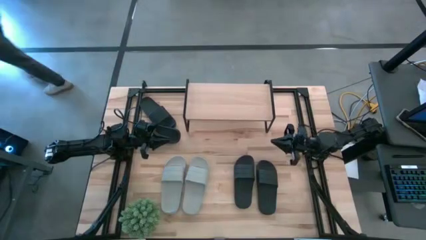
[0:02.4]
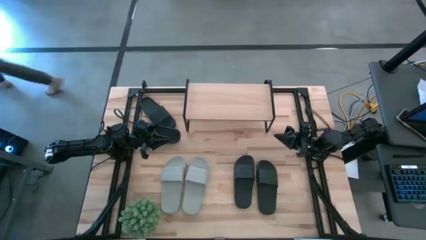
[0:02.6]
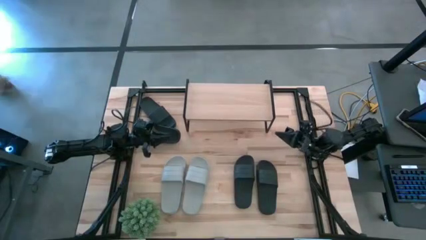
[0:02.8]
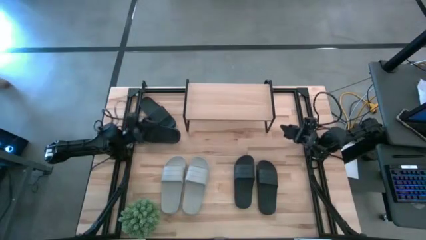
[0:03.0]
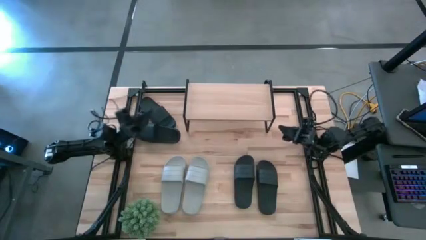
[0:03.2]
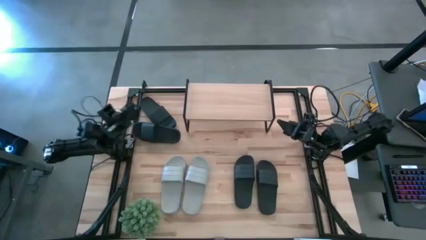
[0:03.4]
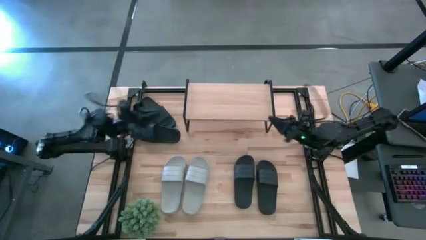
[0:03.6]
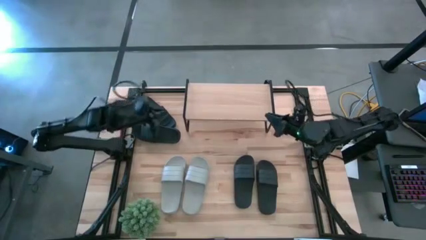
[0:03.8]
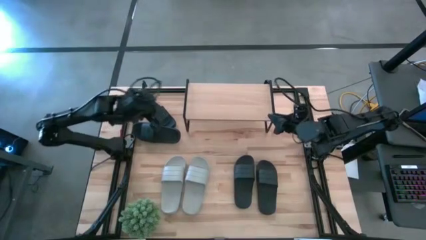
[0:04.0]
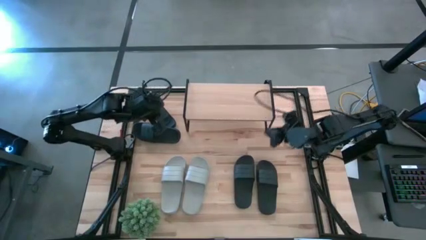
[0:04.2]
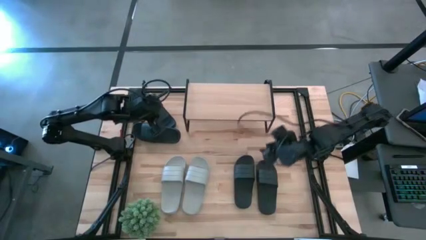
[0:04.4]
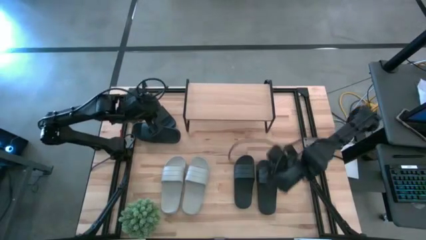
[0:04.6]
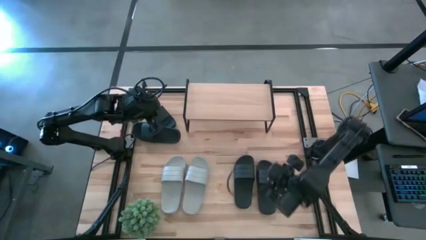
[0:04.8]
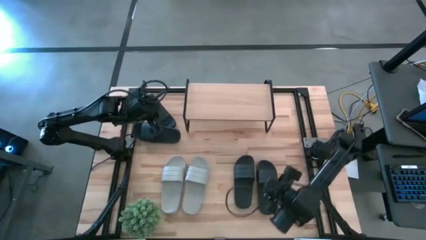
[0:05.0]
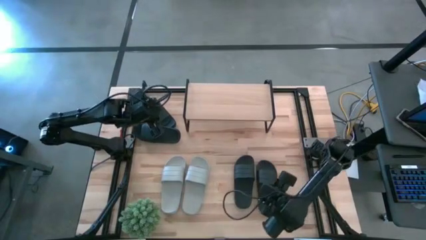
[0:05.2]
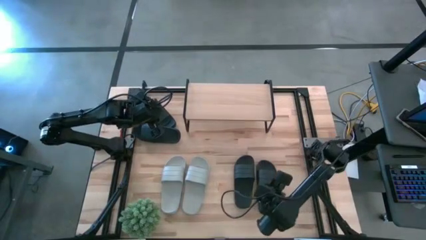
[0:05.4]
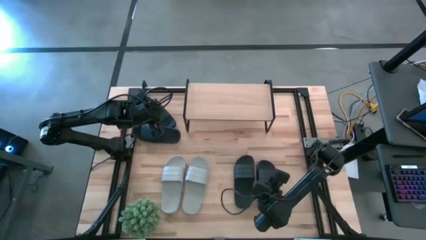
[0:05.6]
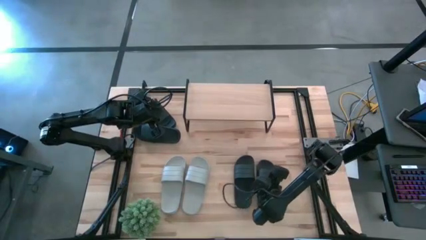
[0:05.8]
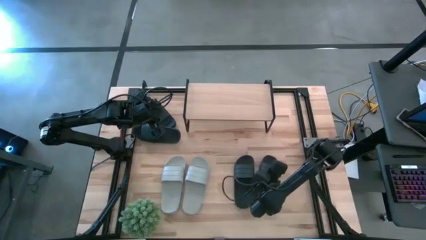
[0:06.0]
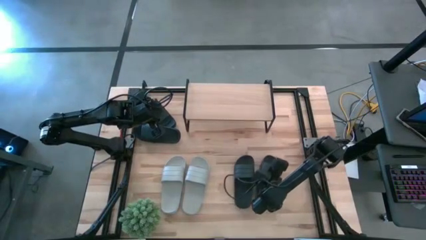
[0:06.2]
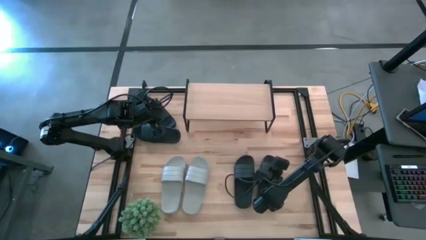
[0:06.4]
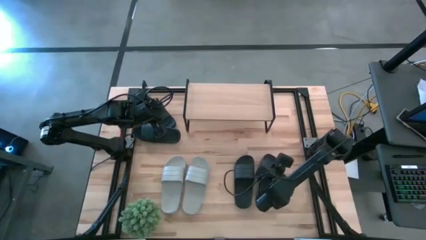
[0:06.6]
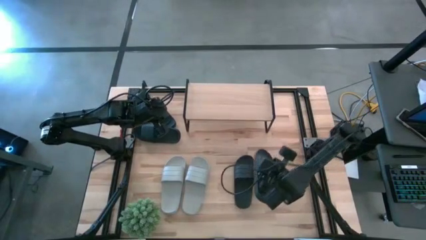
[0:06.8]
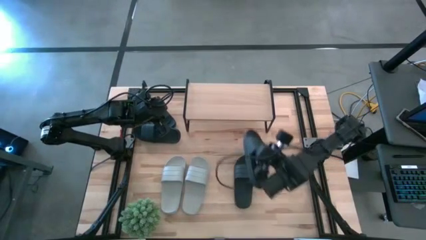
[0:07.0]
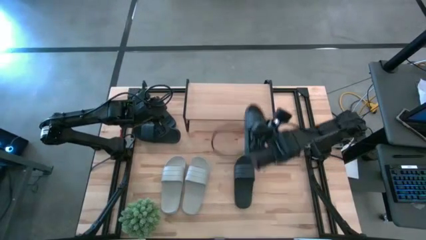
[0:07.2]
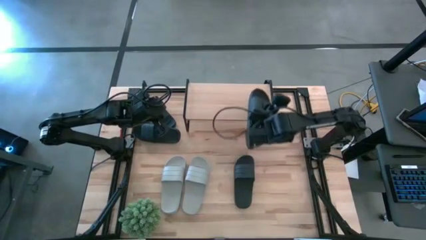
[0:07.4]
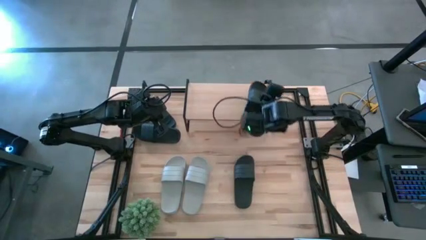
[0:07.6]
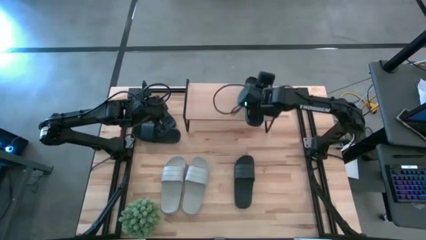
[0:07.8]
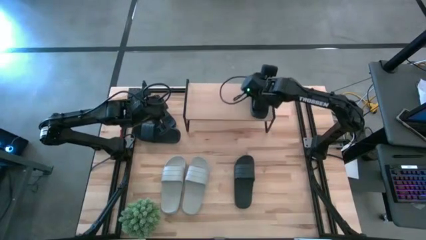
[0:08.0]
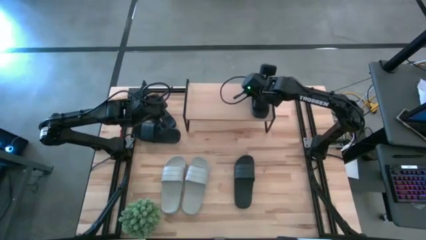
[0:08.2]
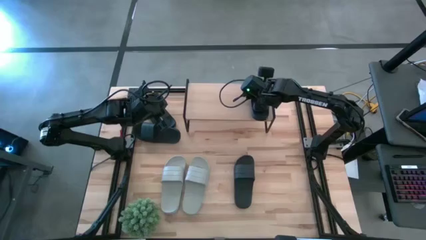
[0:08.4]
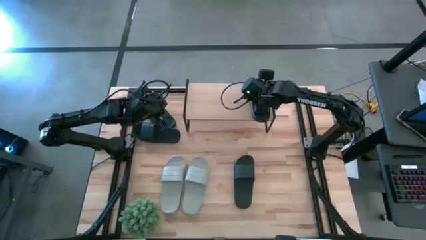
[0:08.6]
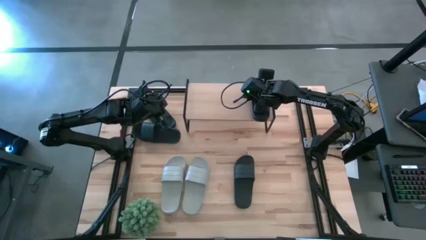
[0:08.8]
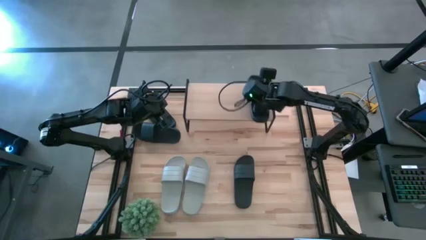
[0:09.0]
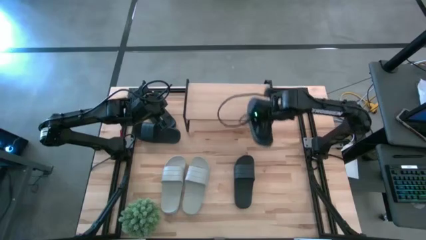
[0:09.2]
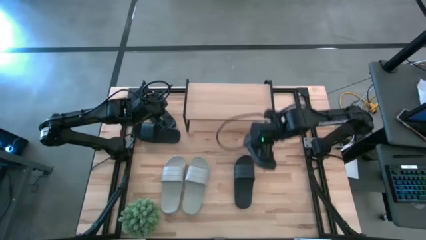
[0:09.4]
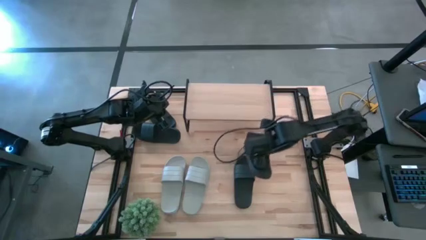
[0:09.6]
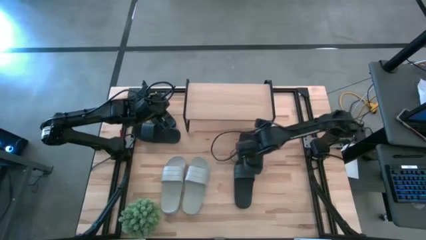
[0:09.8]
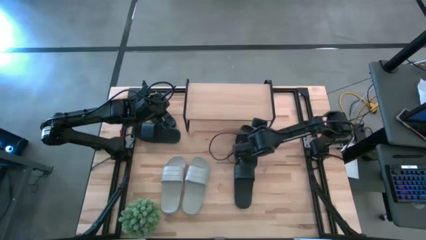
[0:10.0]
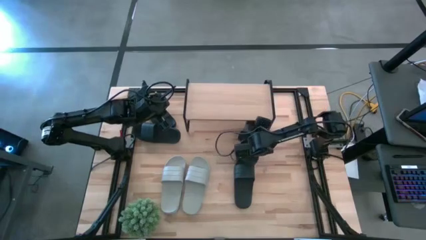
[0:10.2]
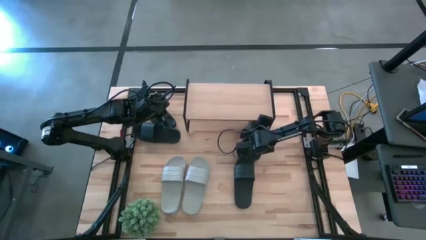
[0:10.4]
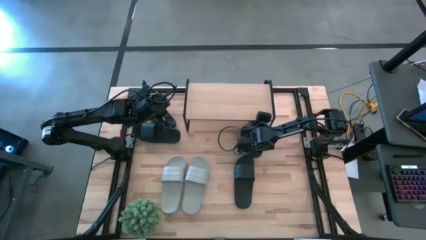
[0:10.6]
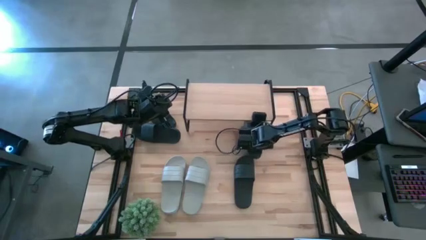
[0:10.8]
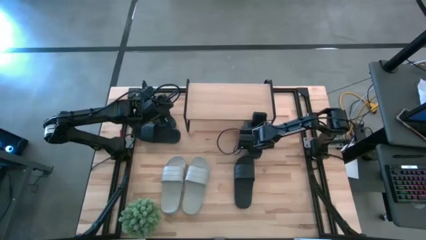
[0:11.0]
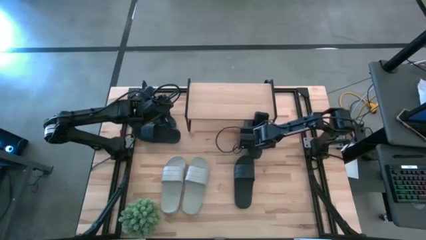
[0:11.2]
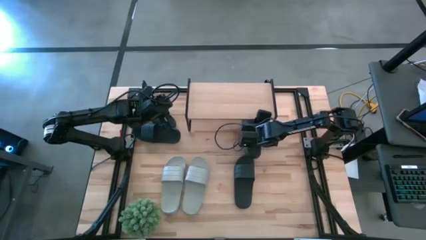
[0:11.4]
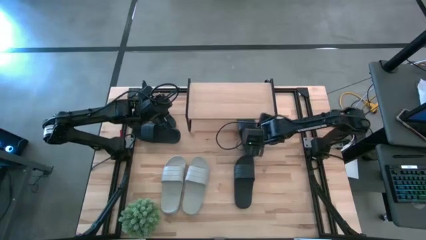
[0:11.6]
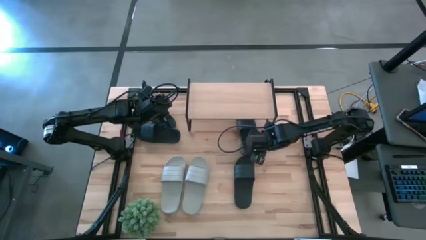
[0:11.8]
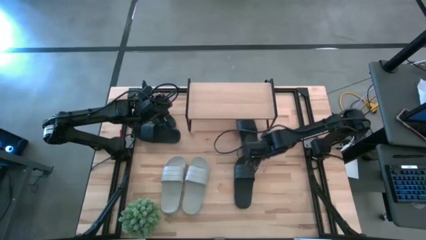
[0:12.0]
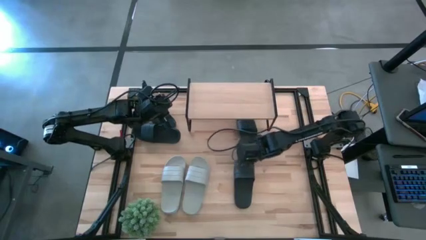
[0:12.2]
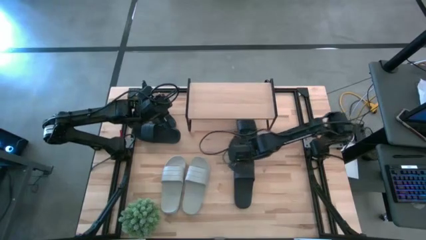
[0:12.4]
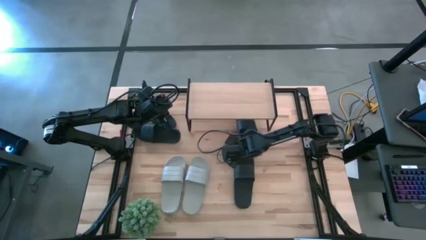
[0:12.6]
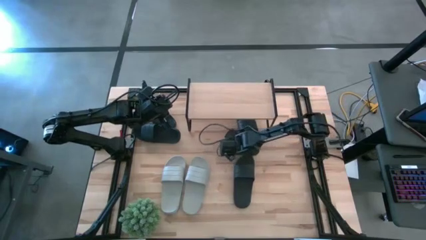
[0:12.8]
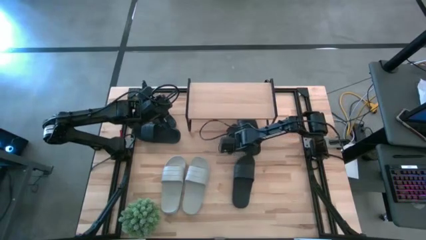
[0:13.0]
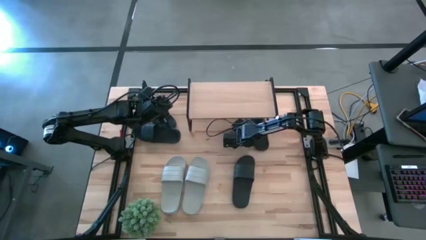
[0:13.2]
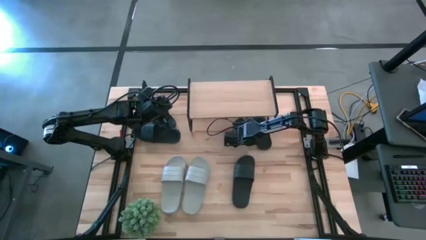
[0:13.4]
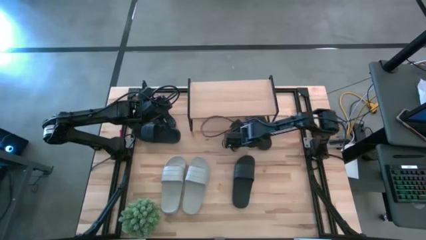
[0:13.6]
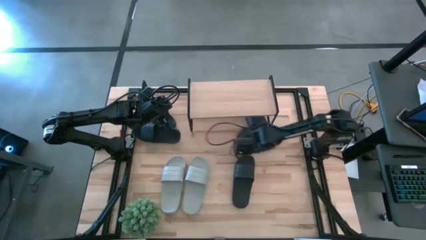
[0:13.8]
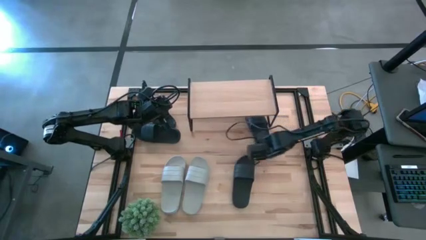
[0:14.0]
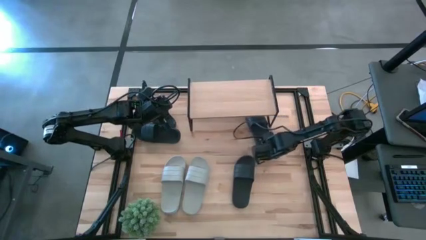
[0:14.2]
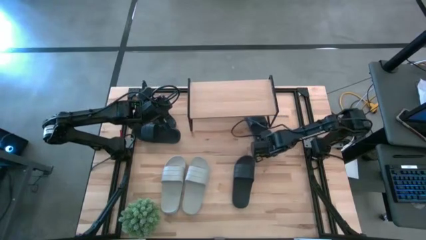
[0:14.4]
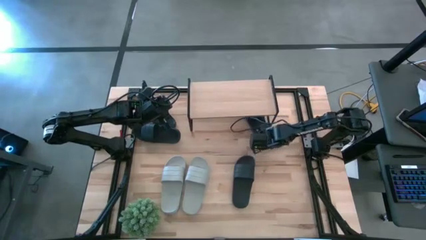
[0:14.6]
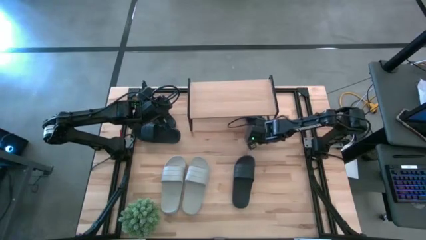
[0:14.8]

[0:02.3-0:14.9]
Task: Pick and place slides into the shelf
Put the black slide under the shelf
